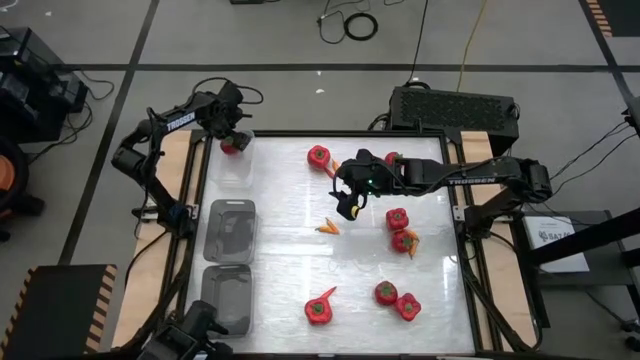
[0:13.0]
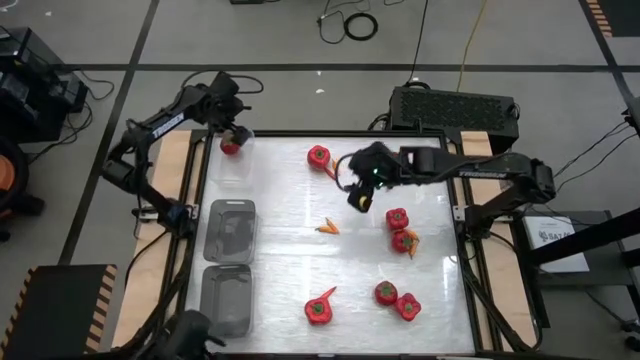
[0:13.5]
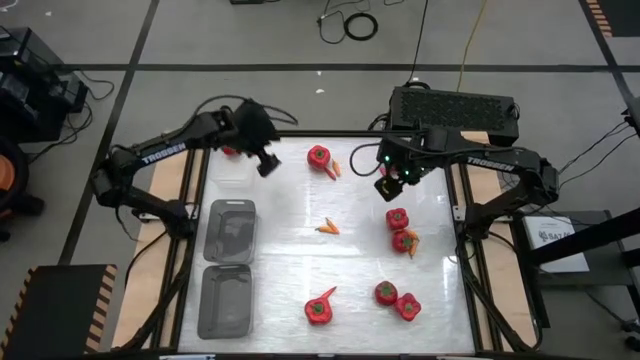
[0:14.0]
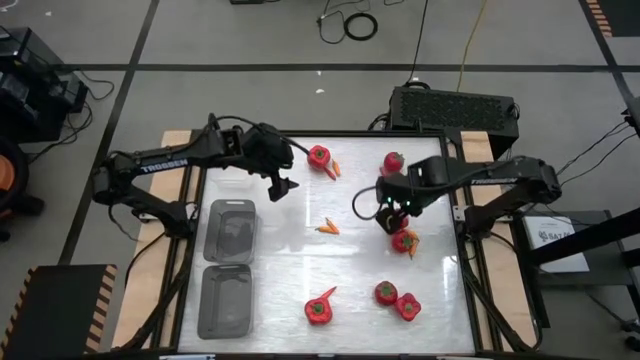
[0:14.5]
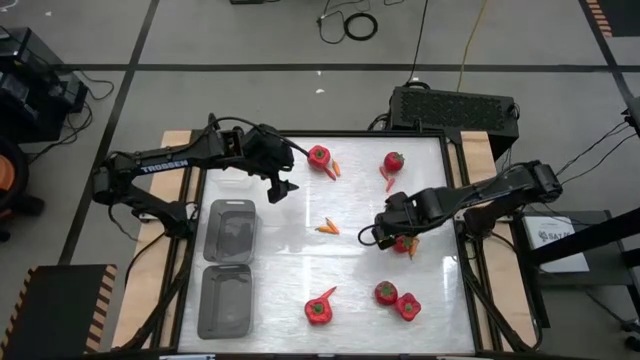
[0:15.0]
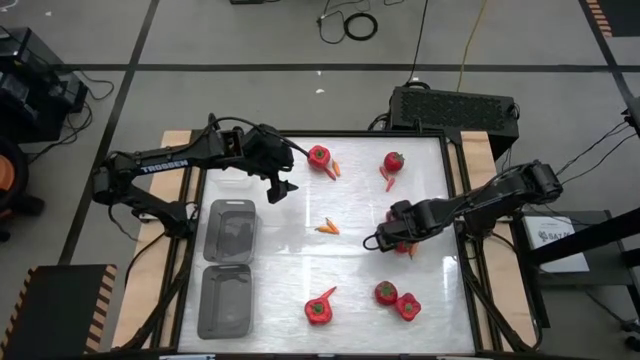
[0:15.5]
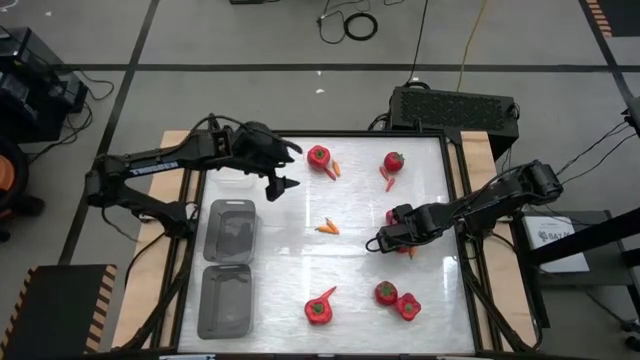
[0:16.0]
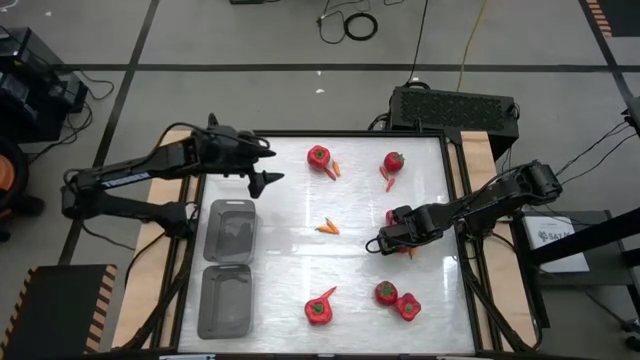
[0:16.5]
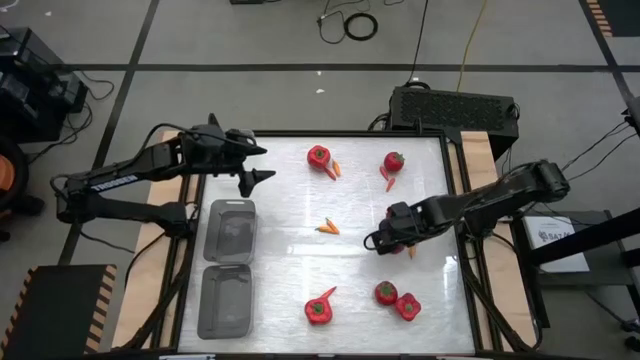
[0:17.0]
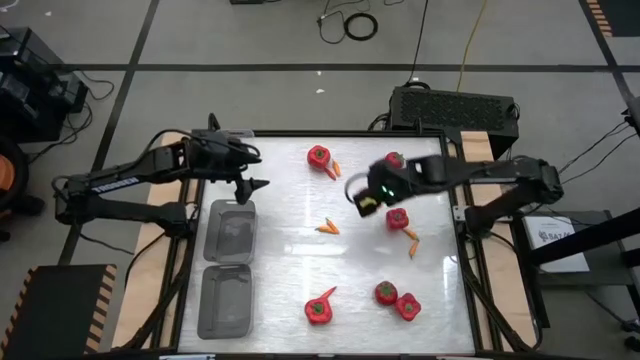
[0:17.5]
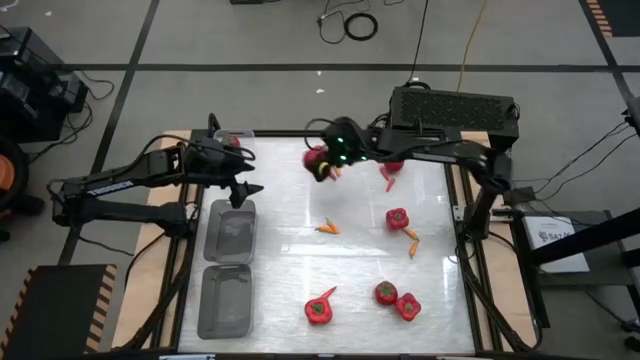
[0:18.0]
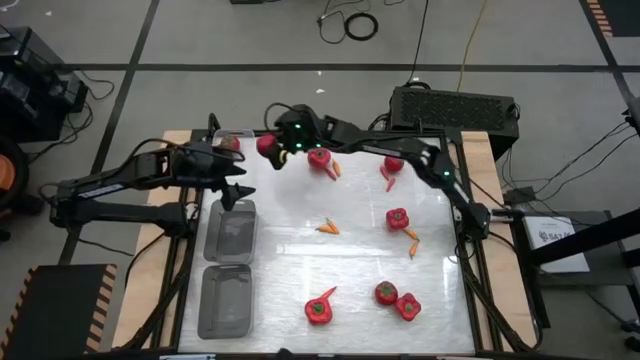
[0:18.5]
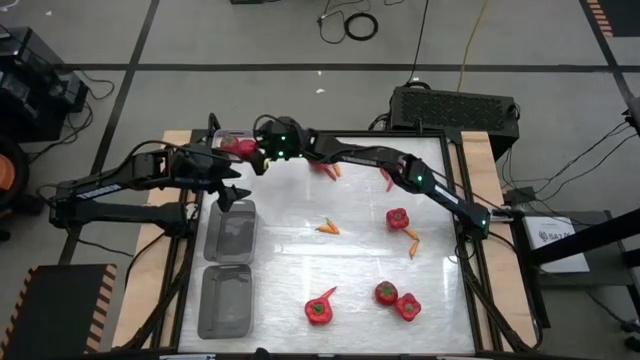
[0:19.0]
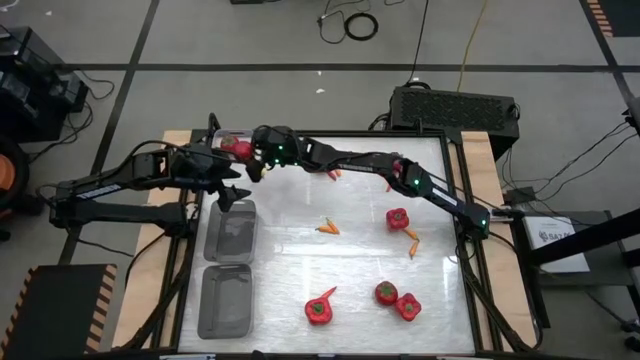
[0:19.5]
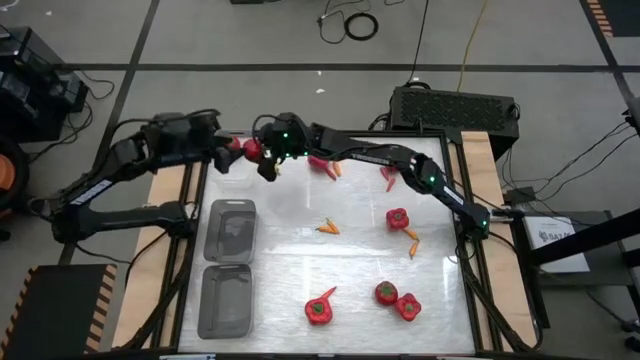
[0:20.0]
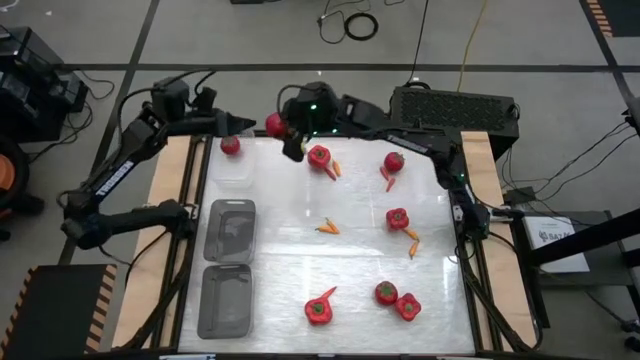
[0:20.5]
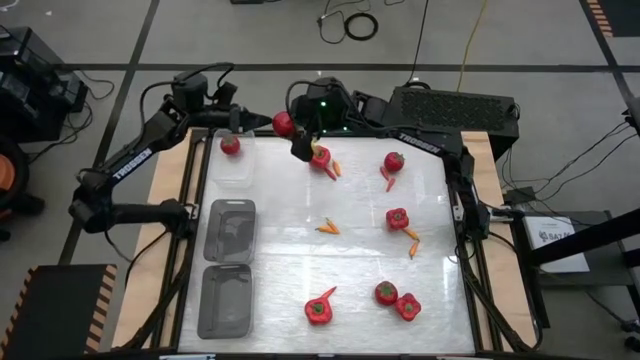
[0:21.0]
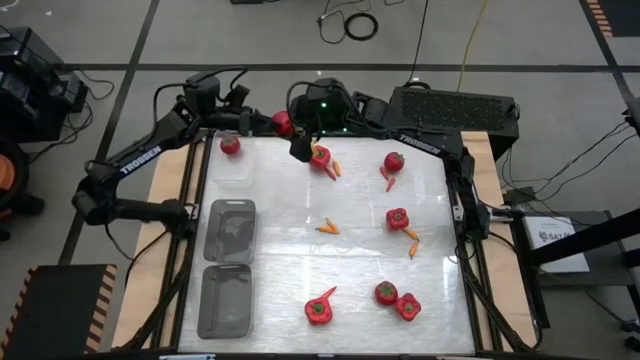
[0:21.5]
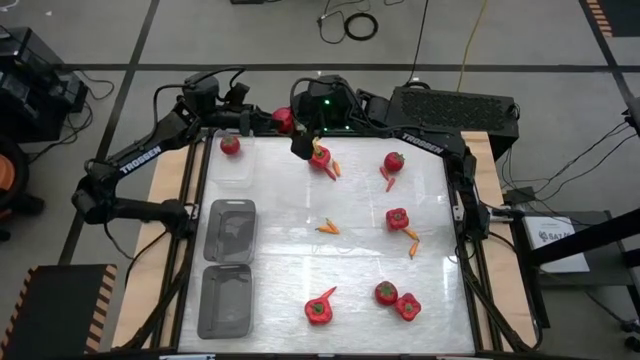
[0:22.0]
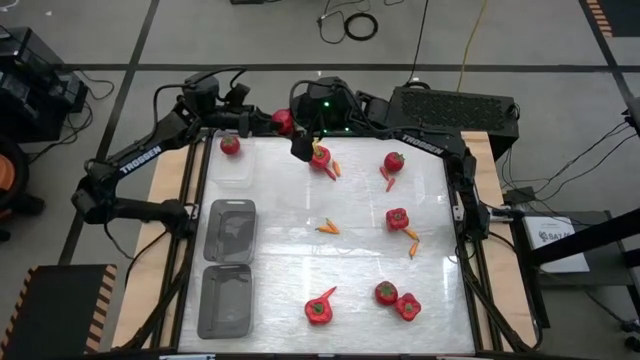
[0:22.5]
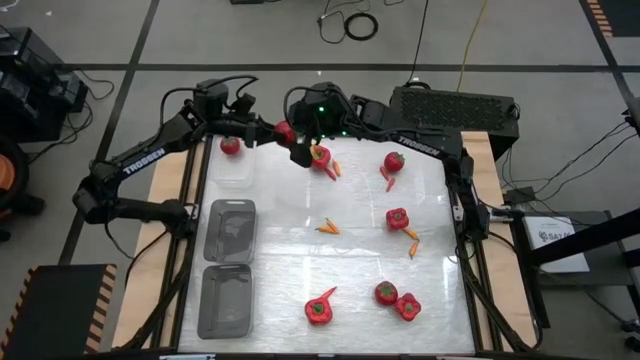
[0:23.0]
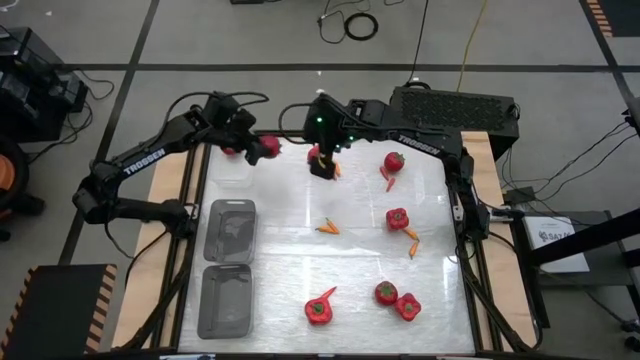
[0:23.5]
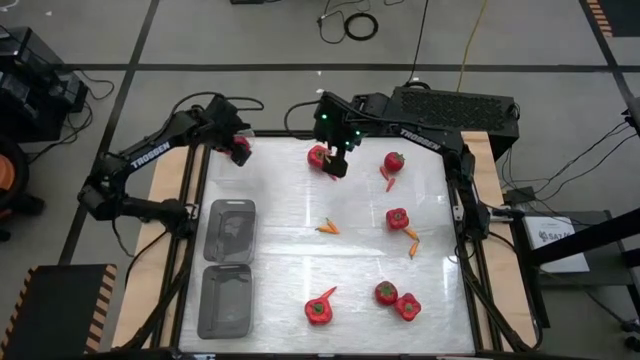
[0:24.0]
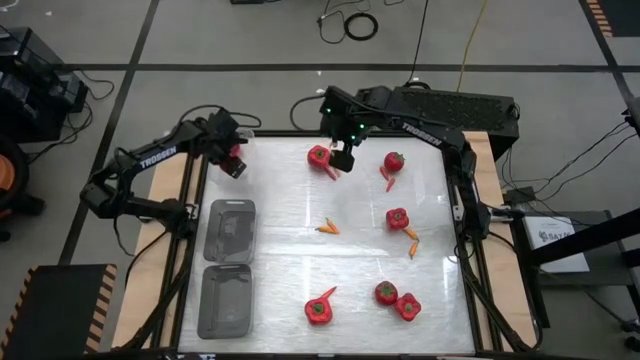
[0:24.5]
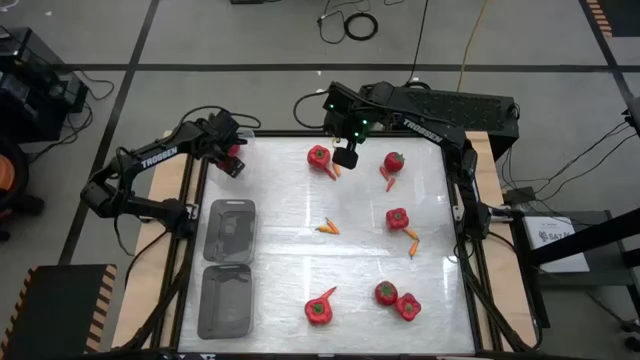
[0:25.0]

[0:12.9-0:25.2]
Task: Sort produce into baskets
Put the red tomato into the transparent bin

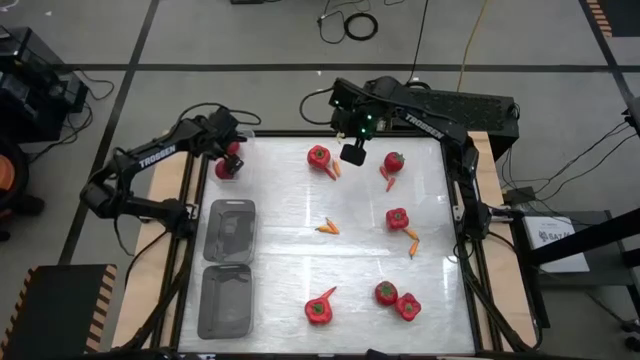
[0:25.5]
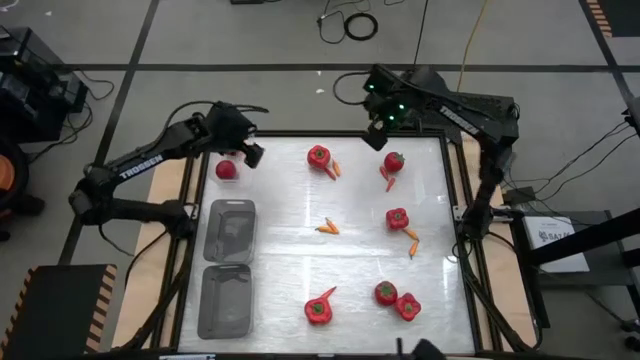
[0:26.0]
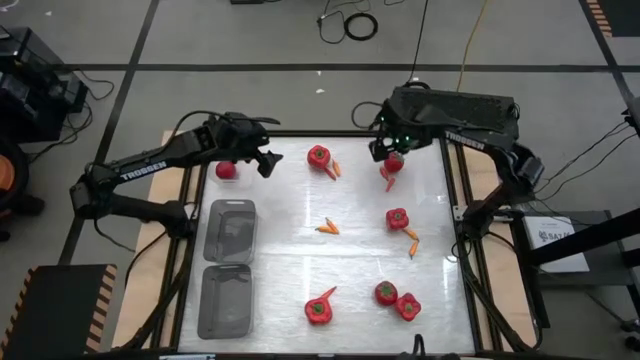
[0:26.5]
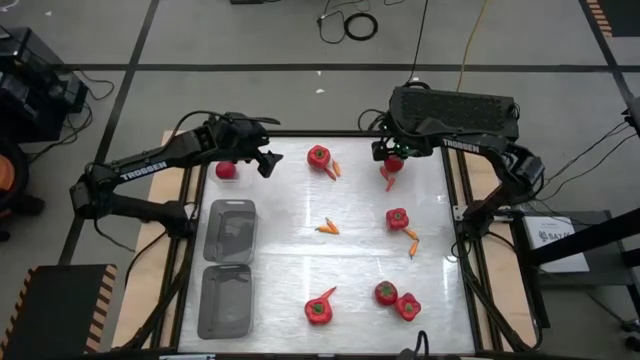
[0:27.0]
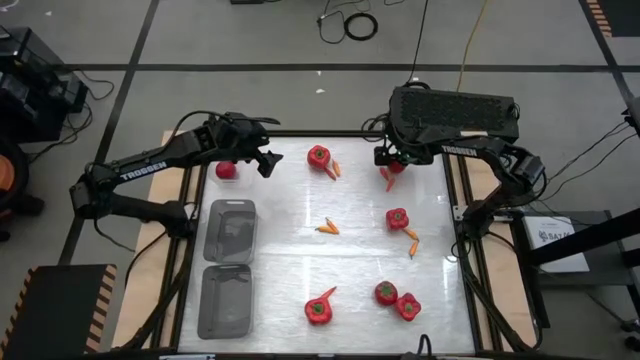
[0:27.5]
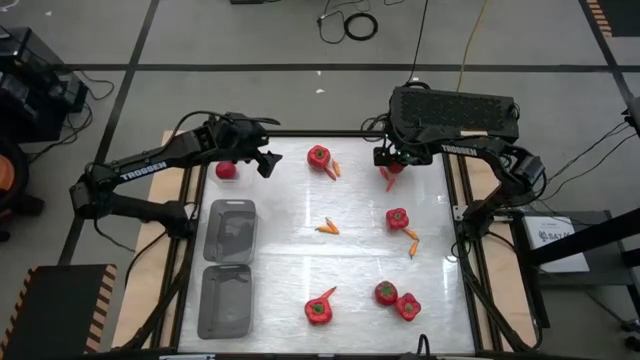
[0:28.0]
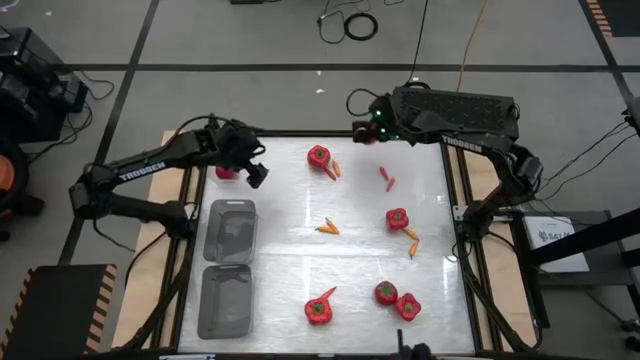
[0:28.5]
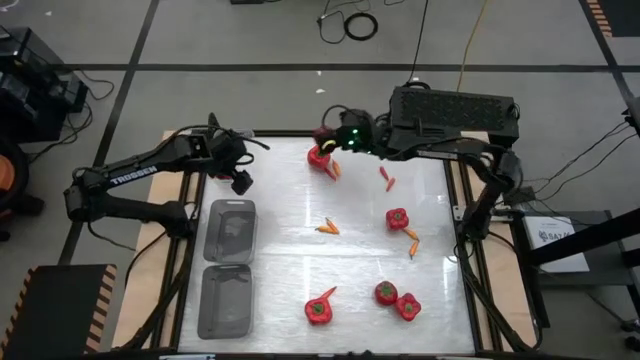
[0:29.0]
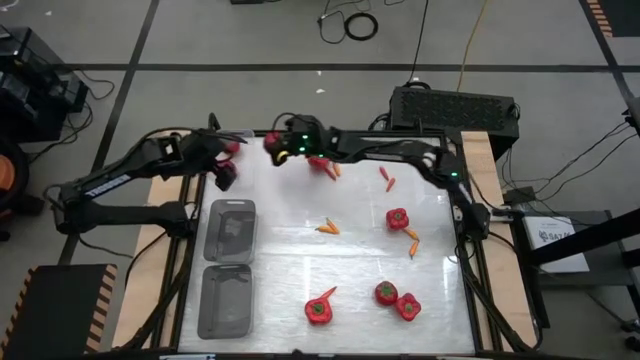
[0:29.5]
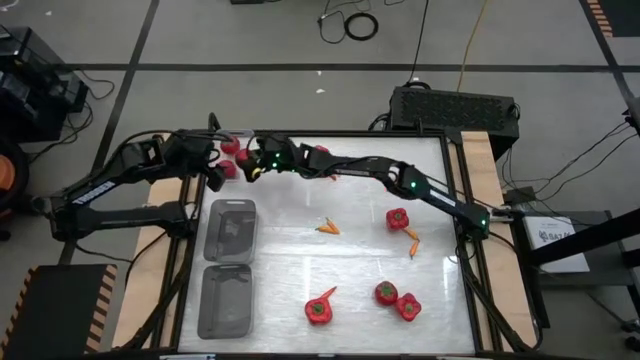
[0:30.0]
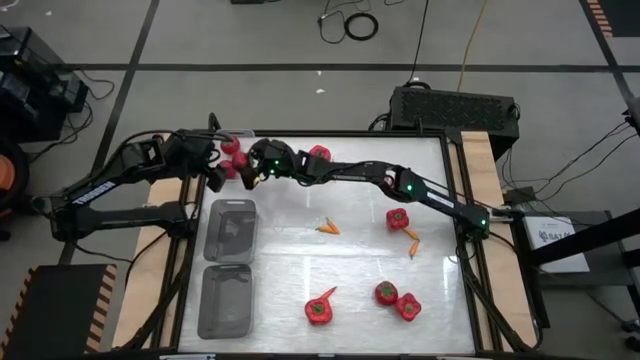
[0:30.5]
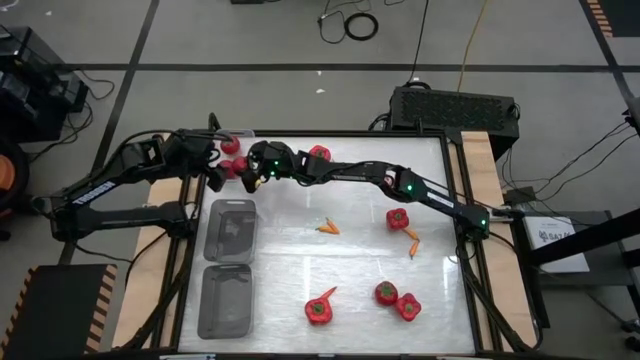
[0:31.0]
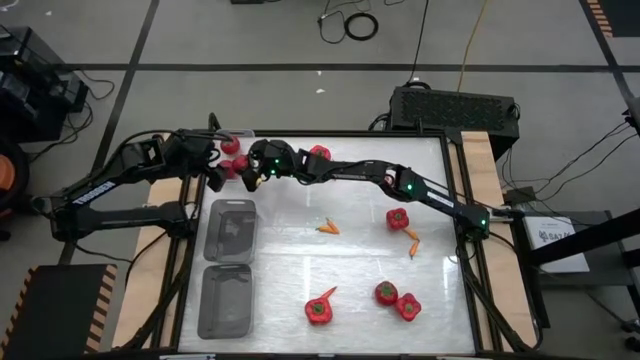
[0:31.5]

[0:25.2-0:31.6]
Put the red tomato into the transparent bin

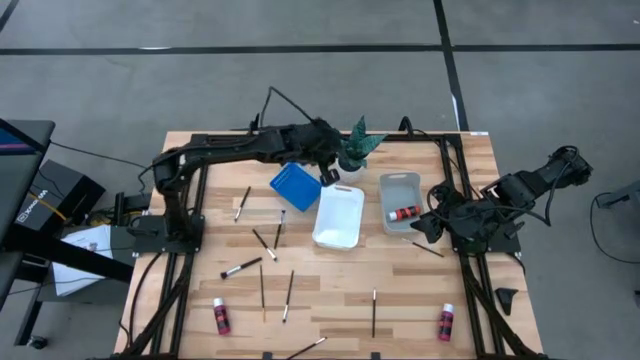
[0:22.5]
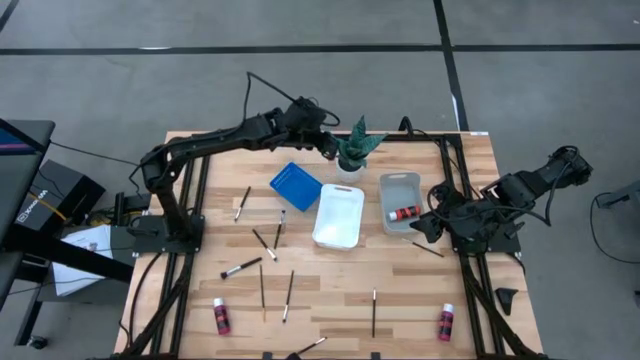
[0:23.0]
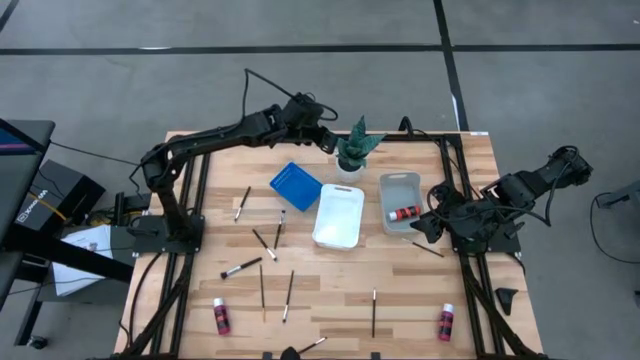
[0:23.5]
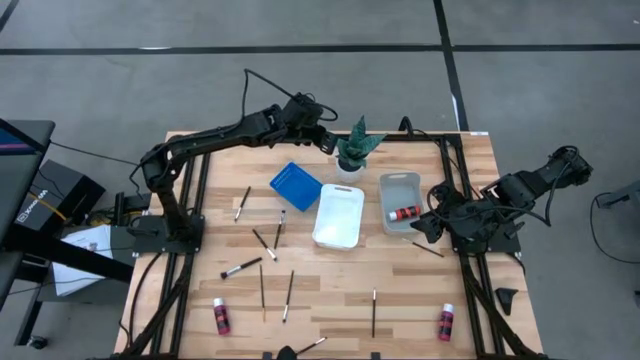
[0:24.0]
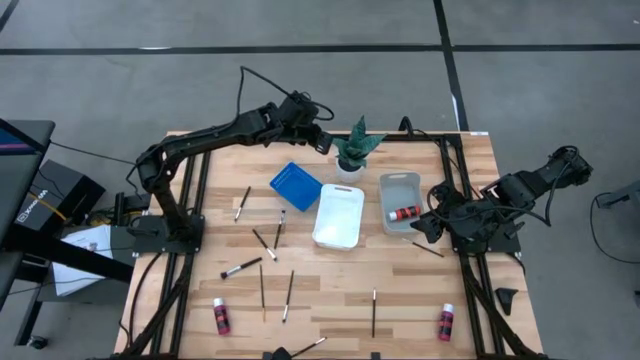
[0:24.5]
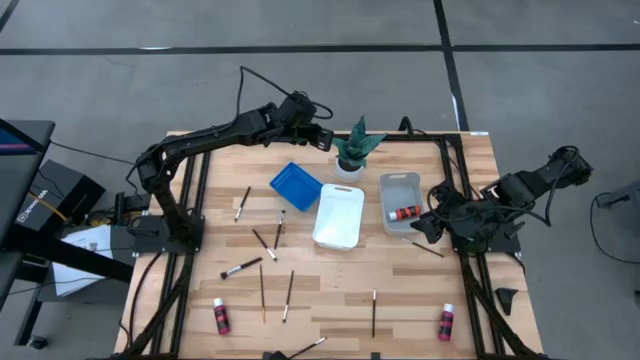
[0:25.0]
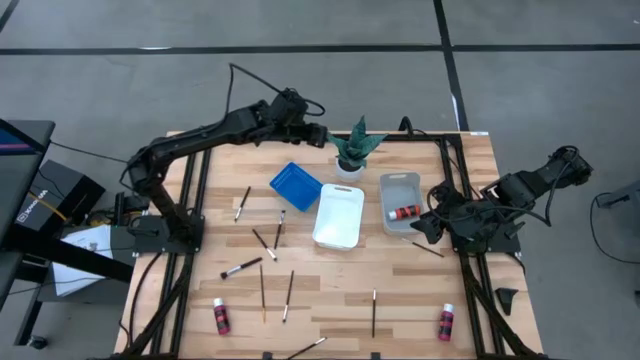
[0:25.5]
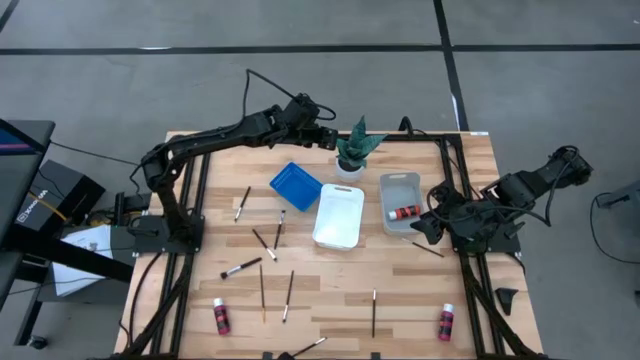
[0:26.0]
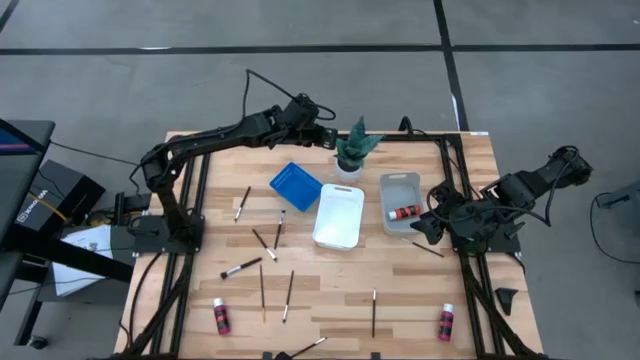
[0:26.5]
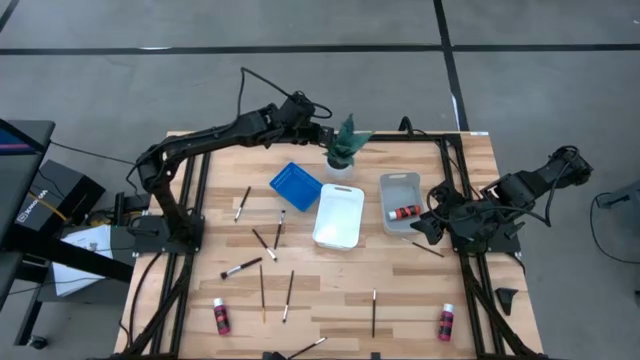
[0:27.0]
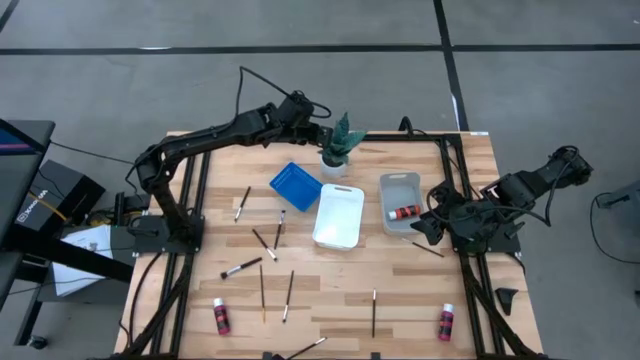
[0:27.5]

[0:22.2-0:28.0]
Task: Pick & Place Paint Supplies
Adjust the white potted plant
